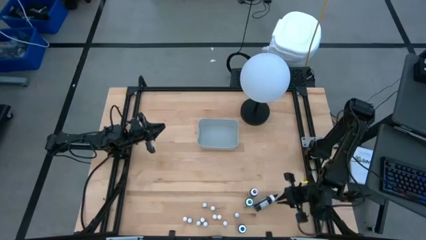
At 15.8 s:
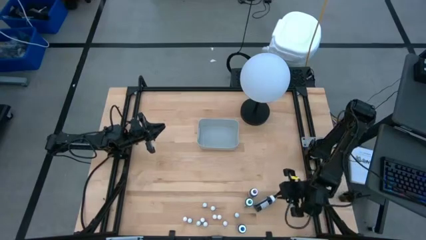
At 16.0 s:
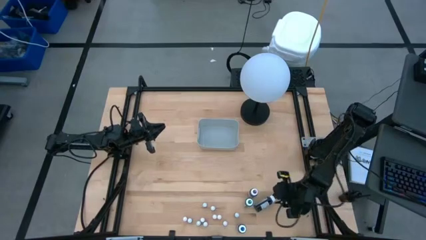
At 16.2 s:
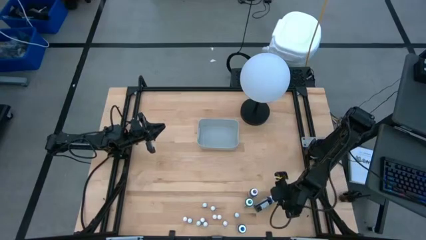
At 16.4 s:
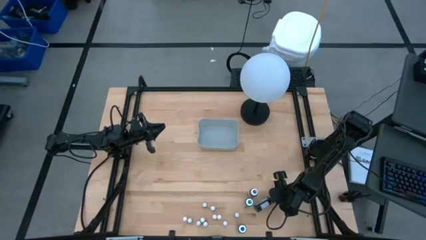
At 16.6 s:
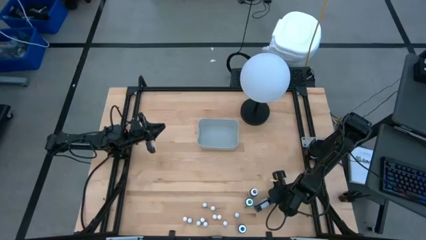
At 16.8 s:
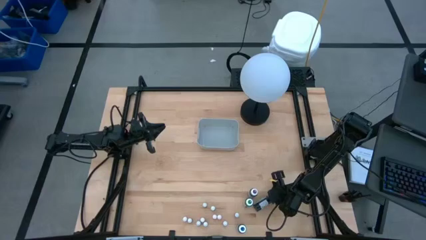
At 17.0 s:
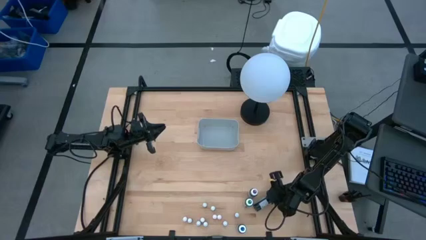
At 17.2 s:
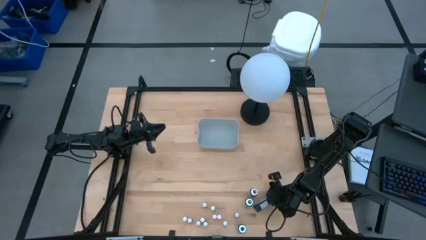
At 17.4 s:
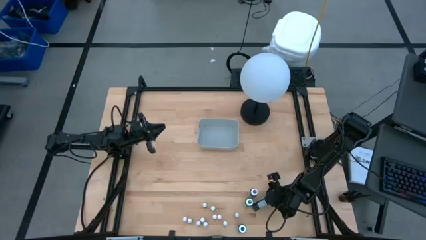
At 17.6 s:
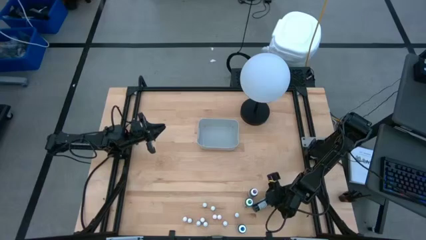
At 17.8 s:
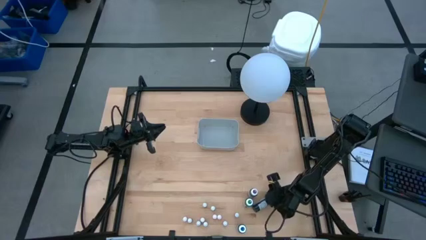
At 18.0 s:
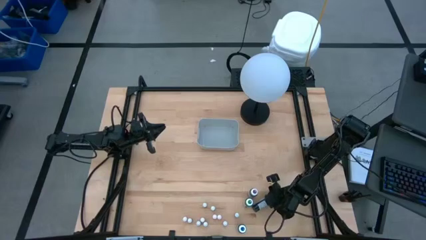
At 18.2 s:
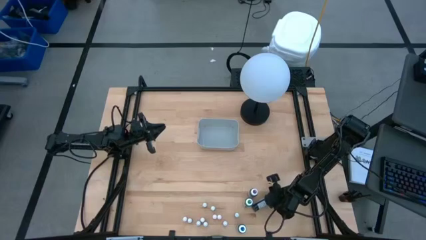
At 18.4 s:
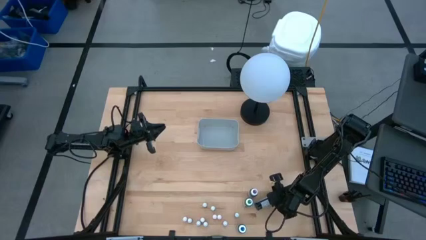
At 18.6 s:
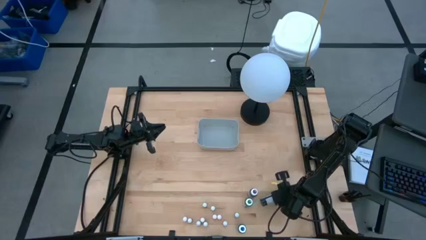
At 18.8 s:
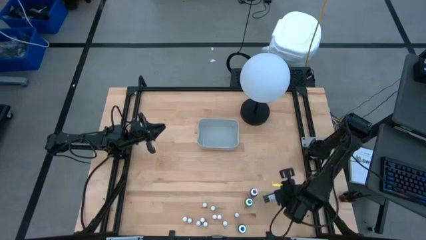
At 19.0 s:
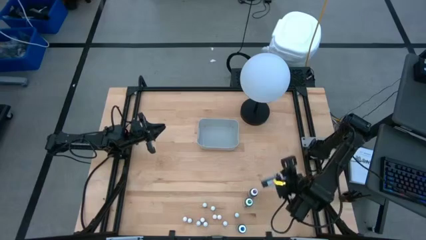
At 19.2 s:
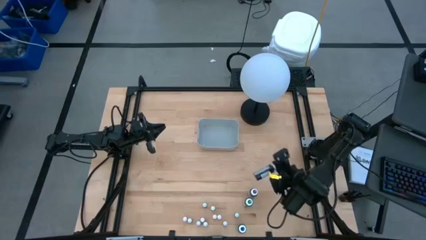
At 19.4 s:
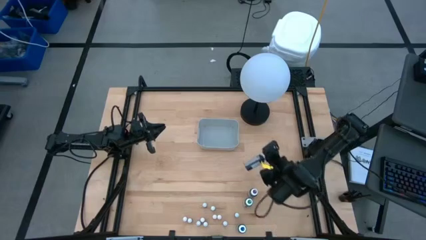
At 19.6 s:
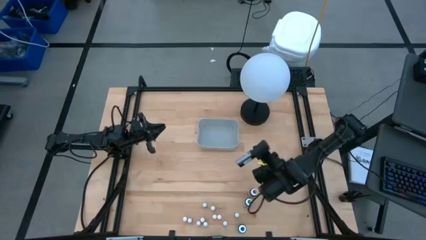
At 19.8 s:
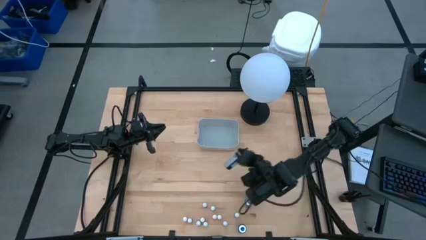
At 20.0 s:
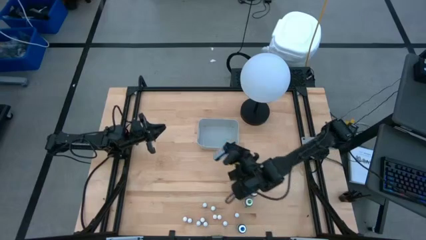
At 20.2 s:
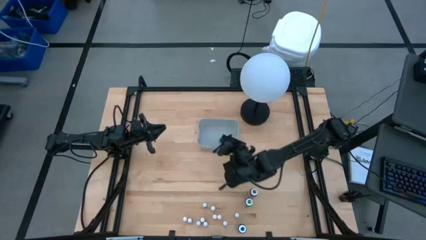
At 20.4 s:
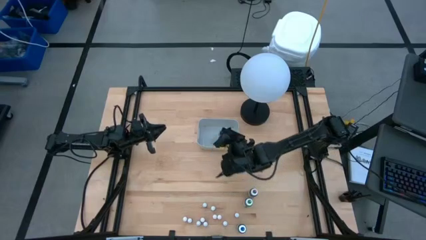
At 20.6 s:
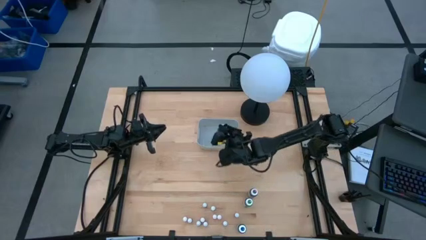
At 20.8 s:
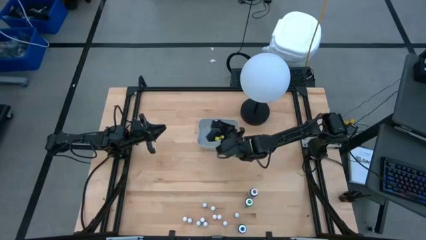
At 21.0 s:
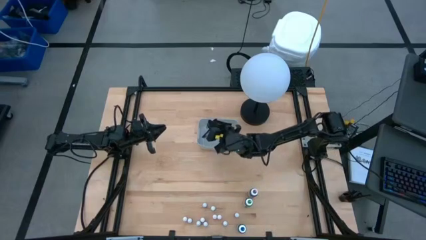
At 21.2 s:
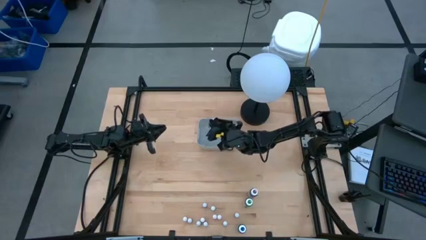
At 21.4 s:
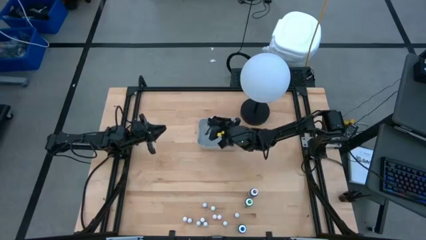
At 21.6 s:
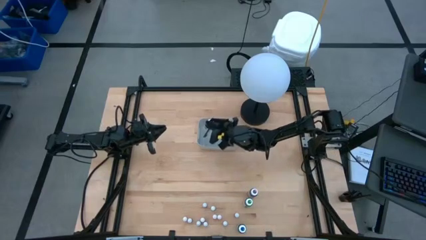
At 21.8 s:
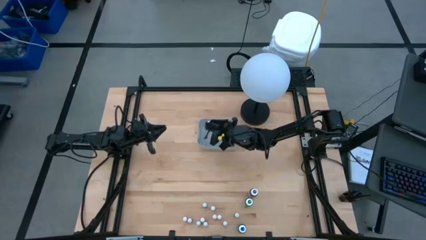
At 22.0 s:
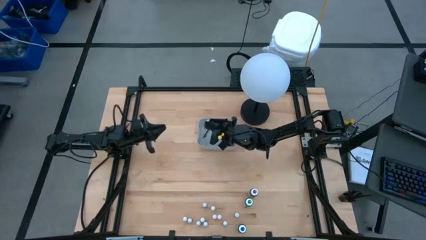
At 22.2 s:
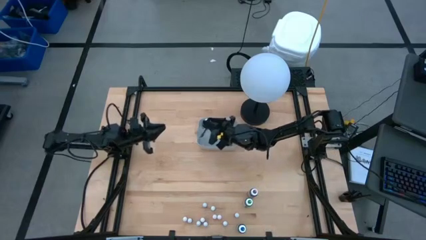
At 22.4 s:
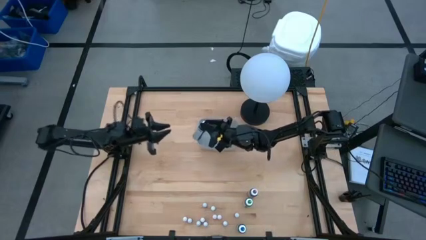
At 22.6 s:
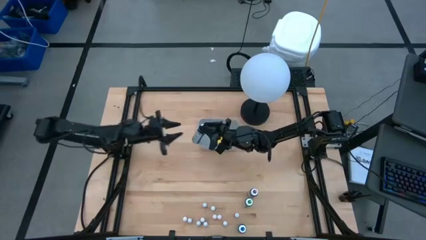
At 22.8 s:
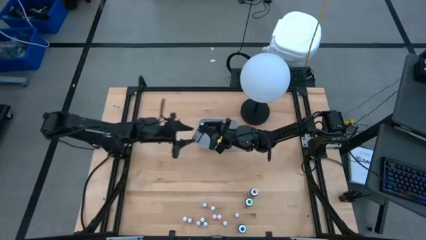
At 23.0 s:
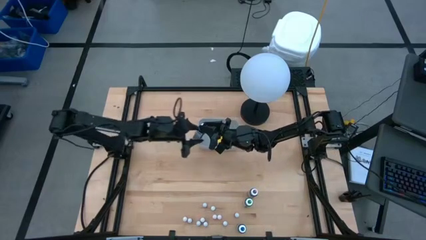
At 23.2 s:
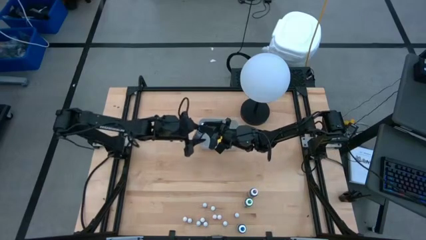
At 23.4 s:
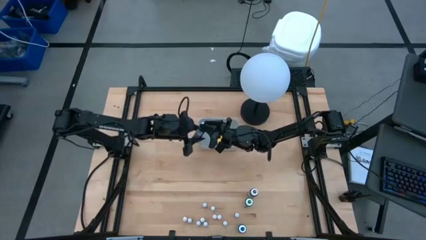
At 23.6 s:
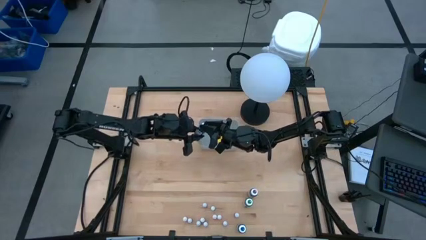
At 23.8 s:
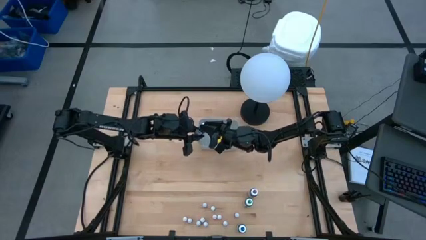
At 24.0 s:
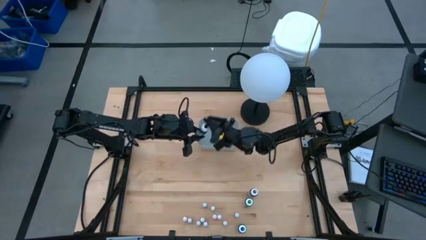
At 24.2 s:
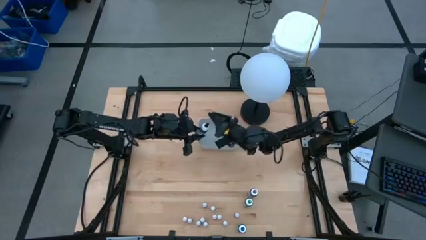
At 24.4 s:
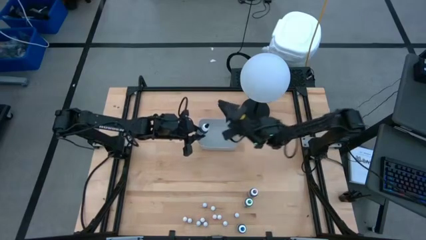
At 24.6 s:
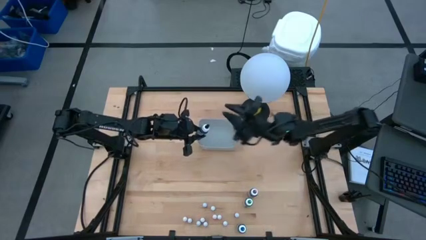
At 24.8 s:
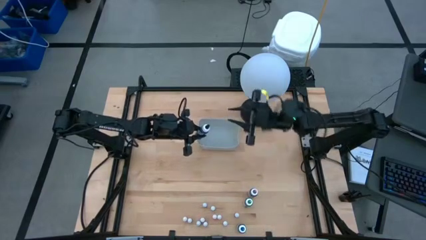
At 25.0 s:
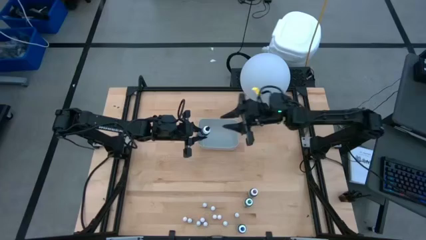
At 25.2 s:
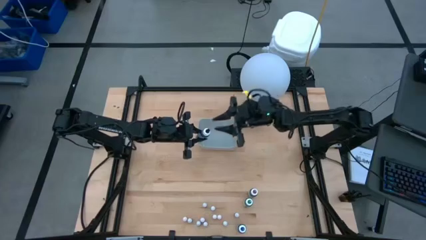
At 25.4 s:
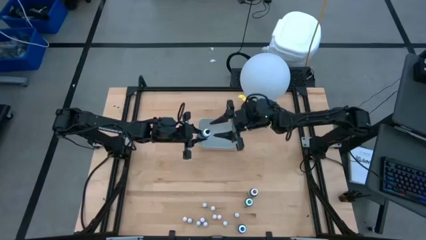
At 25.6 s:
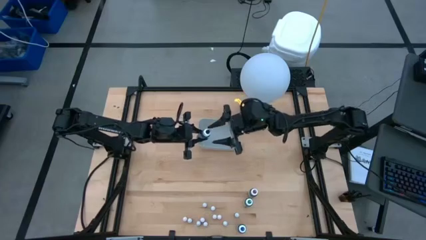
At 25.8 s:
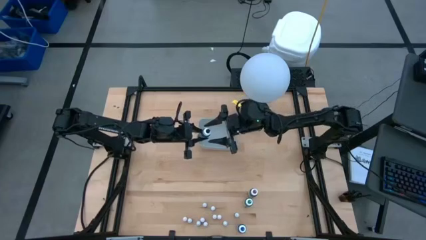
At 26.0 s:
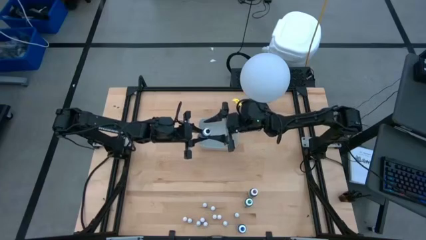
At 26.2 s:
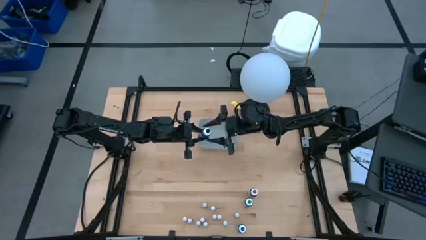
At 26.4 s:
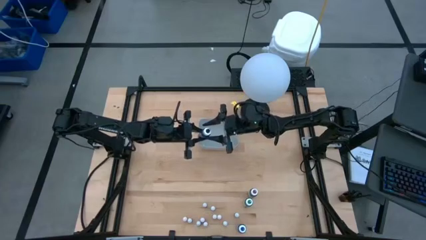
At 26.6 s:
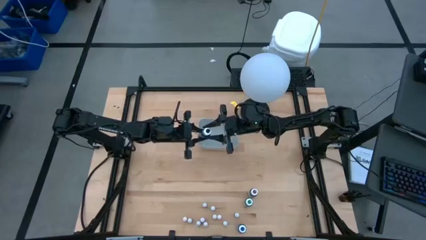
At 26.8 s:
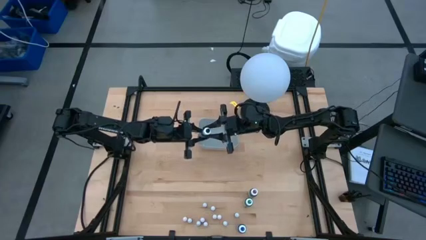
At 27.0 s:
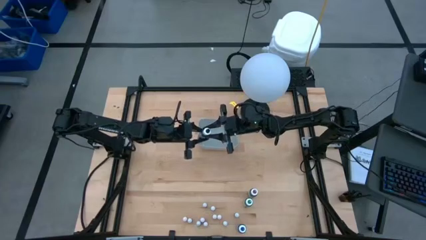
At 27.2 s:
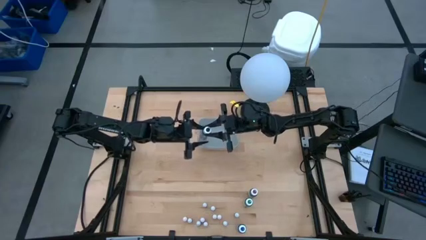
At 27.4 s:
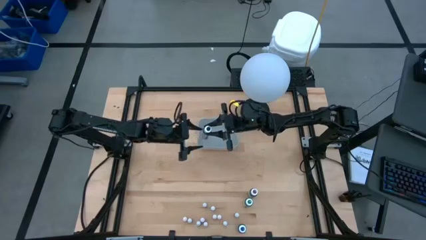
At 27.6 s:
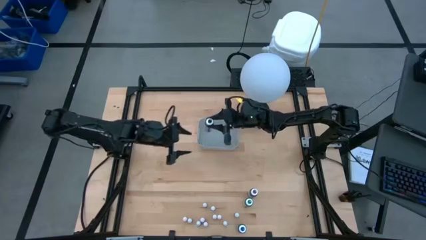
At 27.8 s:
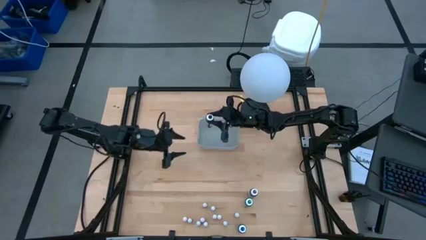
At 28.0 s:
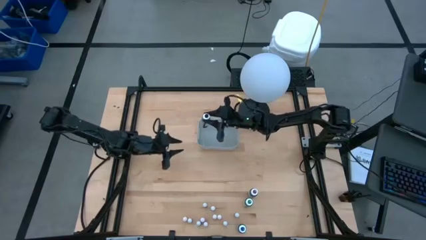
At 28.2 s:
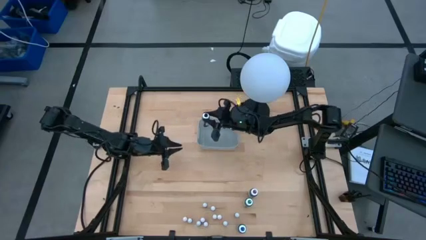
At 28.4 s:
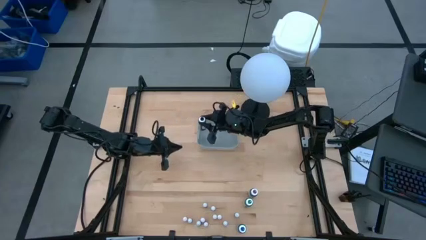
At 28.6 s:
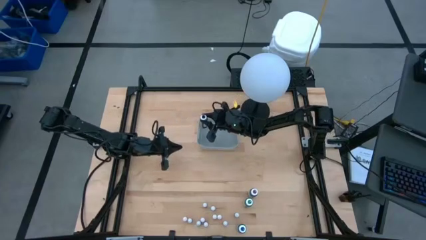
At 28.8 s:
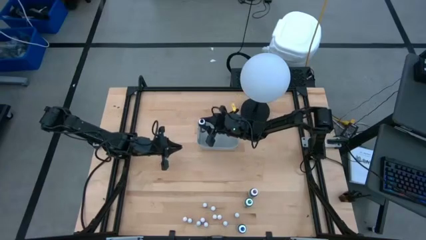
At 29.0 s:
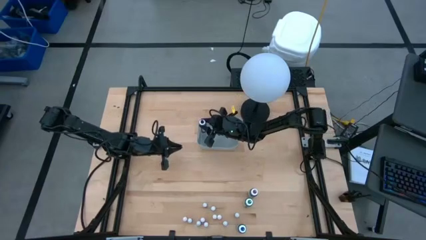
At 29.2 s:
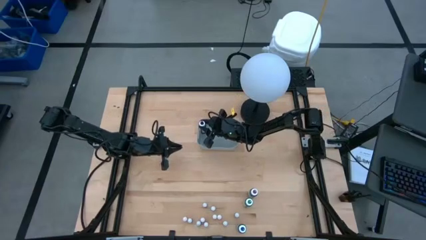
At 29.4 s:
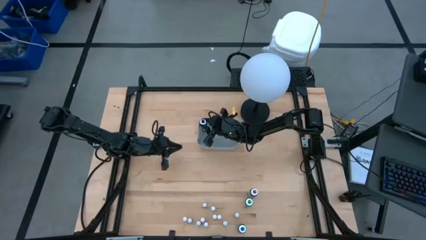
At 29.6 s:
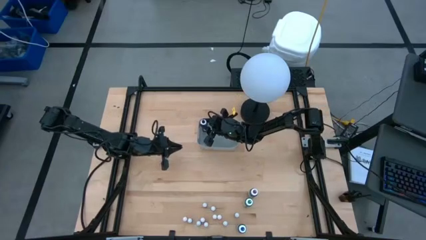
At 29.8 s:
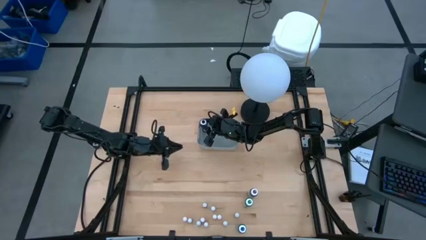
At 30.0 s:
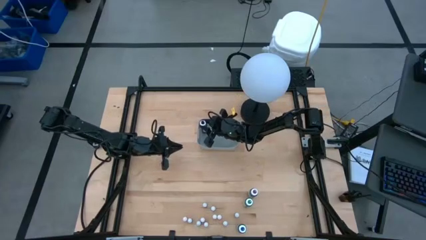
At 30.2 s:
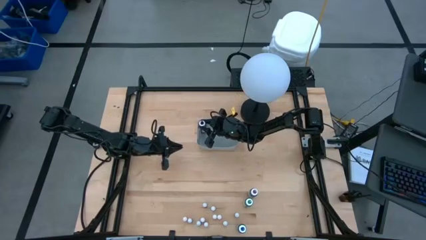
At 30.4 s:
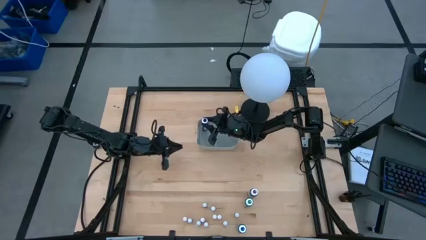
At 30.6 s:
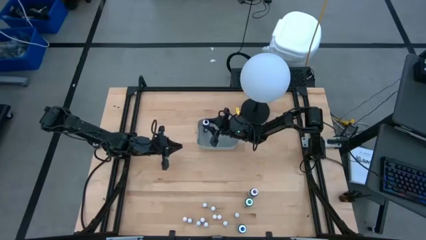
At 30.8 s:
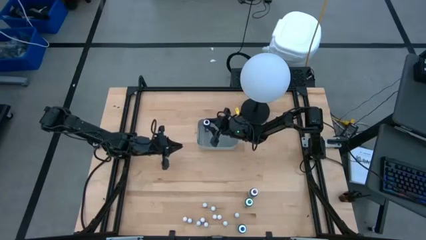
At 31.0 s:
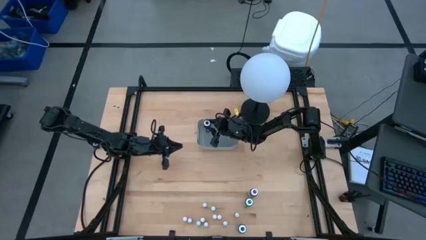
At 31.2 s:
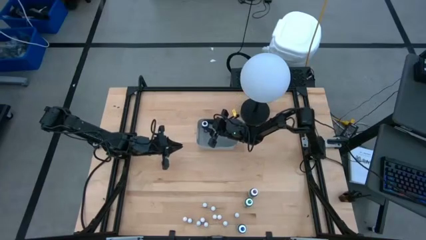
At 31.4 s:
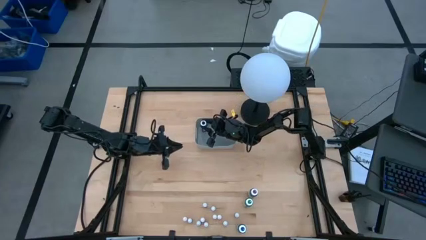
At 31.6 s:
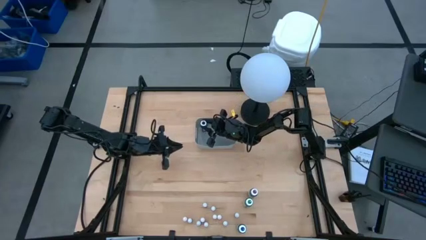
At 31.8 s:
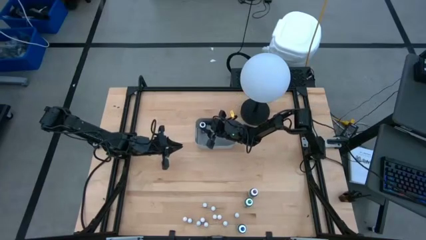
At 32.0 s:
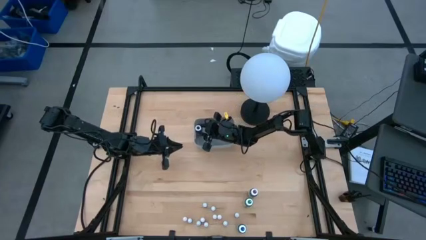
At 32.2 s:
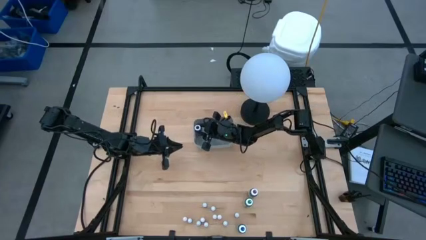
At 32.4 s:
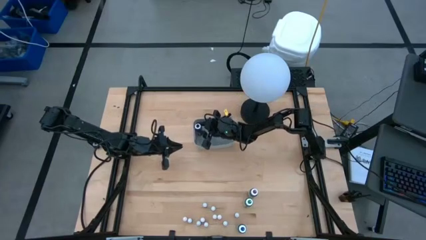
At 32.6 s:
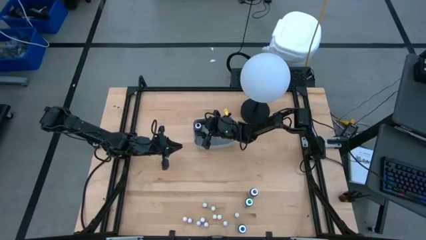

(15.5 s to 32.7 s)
Task: Pick & Place food coloring
Put the large black food coloring bottle into the gray bin
